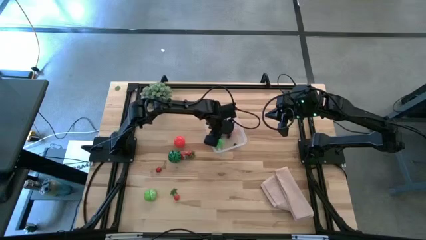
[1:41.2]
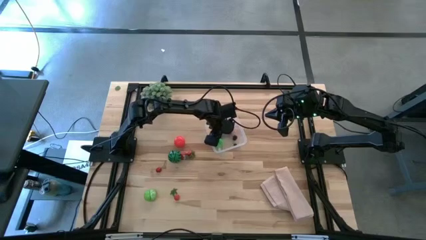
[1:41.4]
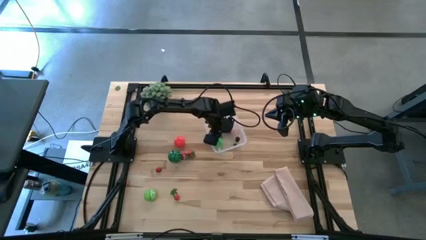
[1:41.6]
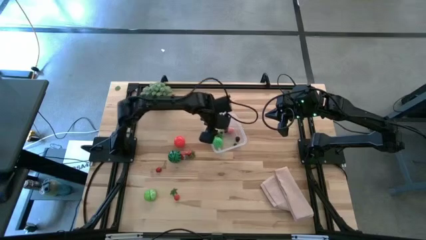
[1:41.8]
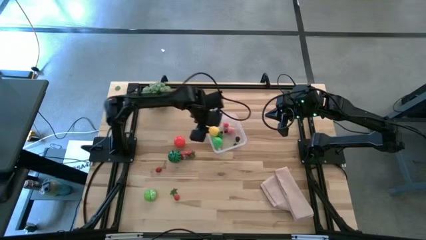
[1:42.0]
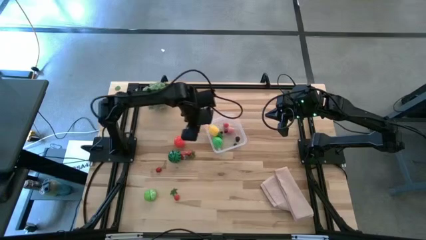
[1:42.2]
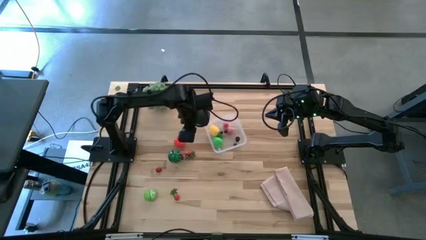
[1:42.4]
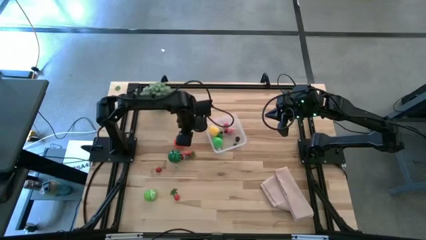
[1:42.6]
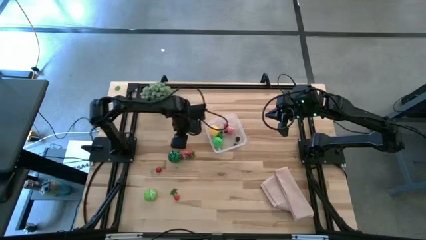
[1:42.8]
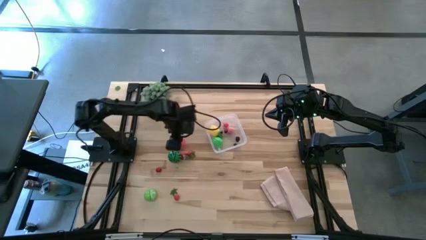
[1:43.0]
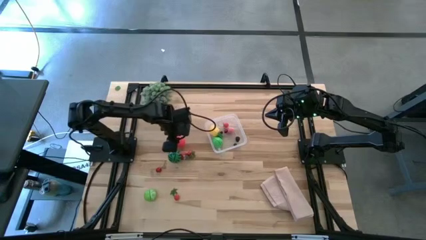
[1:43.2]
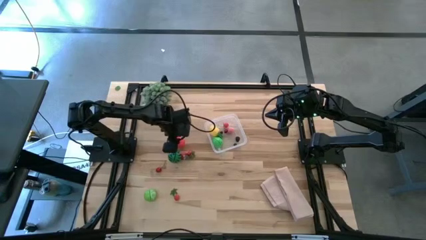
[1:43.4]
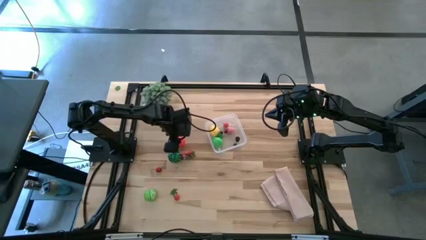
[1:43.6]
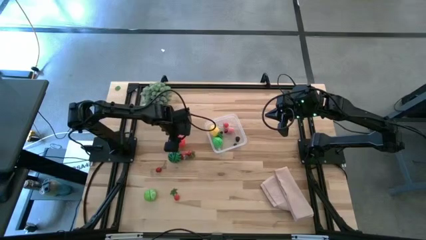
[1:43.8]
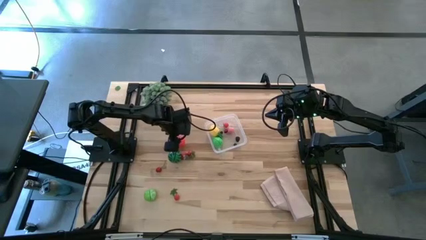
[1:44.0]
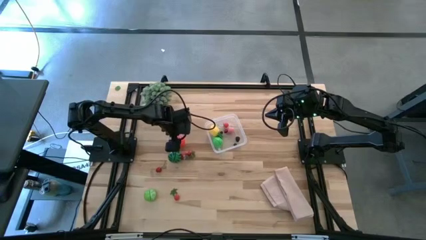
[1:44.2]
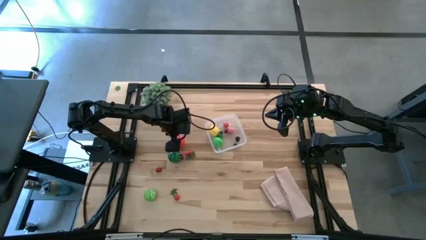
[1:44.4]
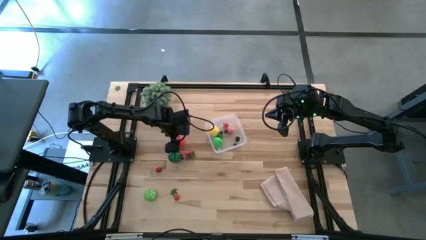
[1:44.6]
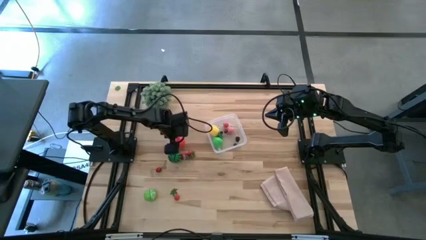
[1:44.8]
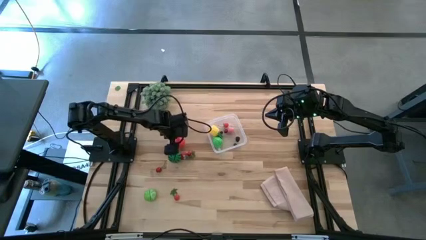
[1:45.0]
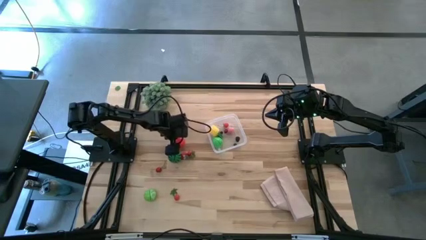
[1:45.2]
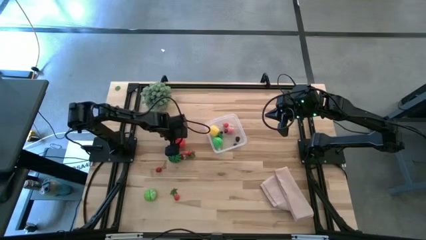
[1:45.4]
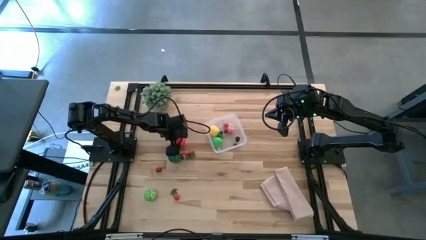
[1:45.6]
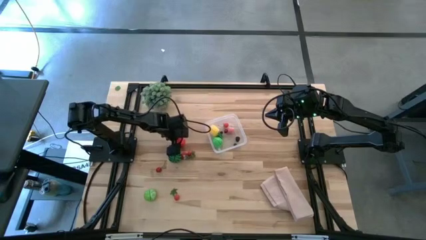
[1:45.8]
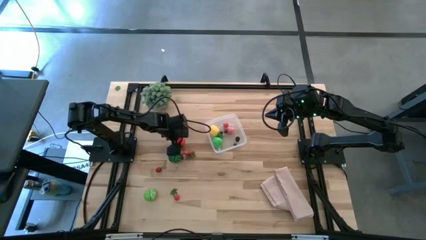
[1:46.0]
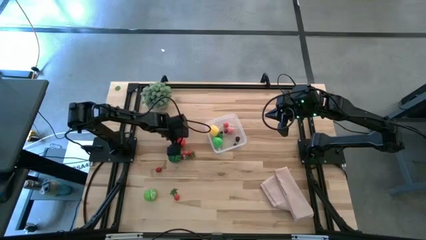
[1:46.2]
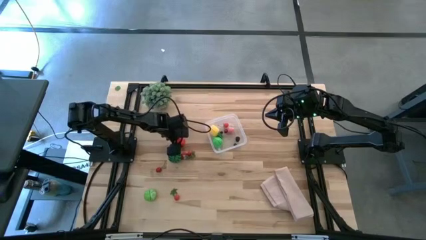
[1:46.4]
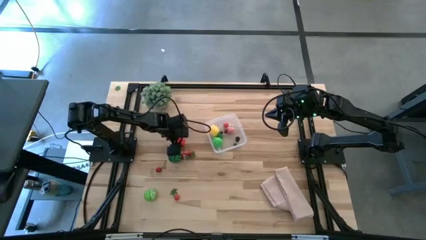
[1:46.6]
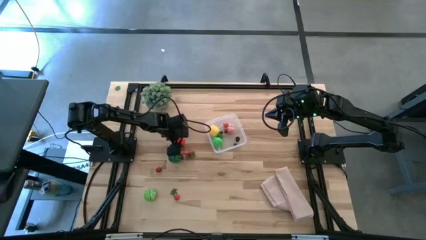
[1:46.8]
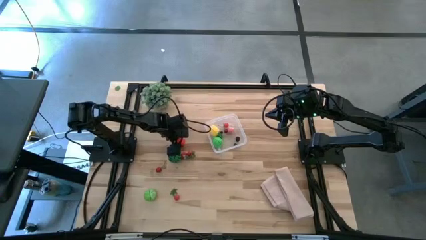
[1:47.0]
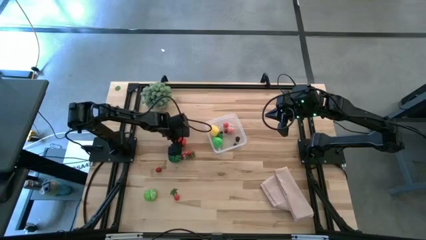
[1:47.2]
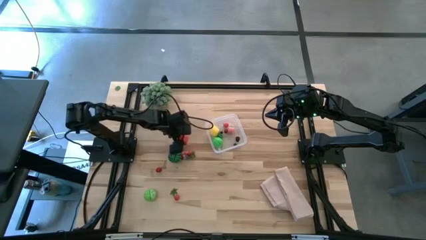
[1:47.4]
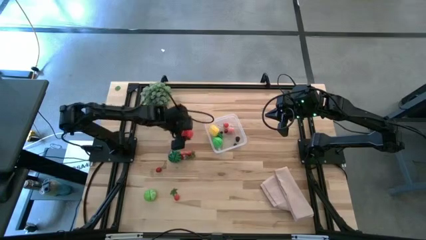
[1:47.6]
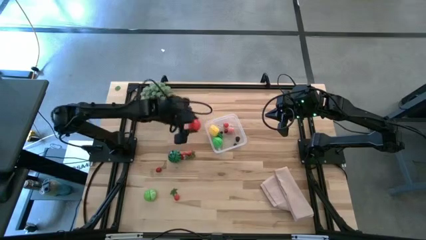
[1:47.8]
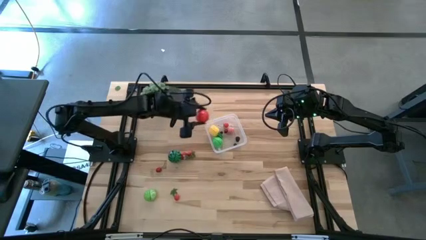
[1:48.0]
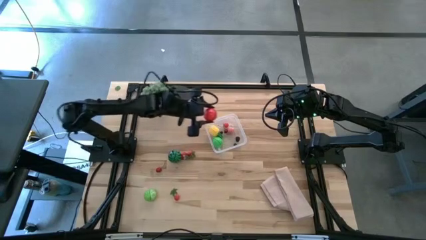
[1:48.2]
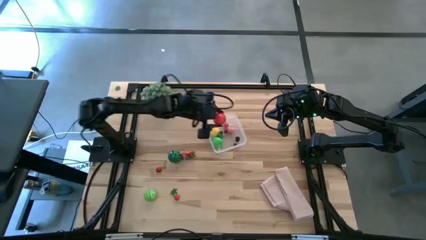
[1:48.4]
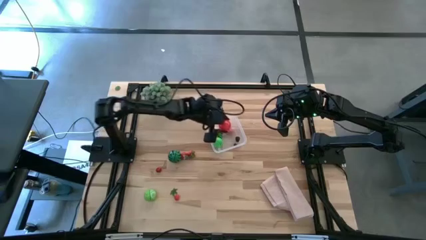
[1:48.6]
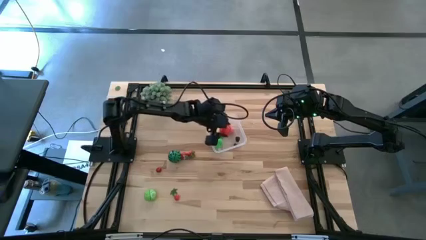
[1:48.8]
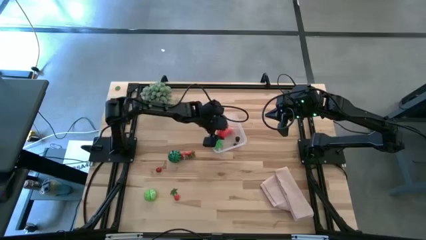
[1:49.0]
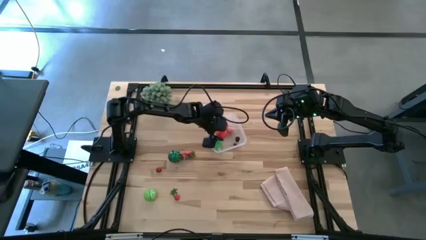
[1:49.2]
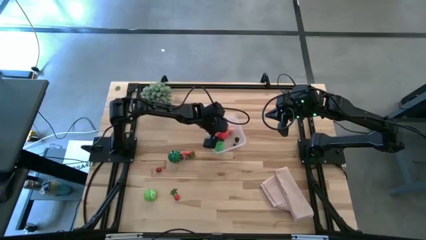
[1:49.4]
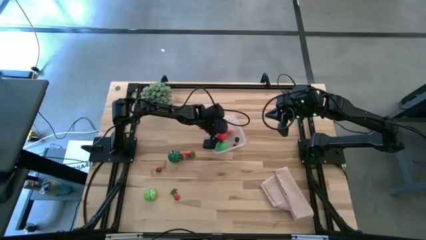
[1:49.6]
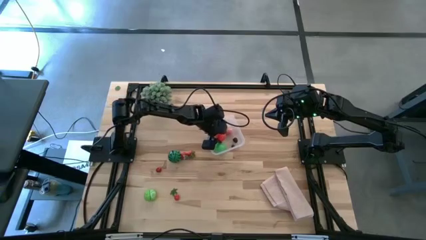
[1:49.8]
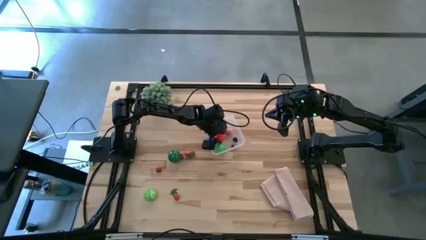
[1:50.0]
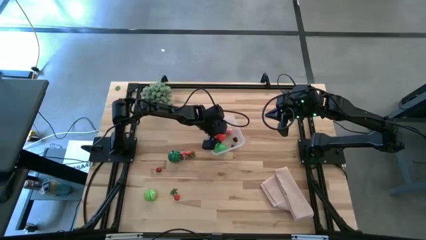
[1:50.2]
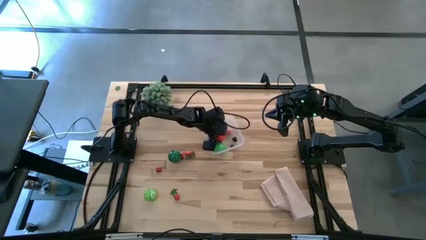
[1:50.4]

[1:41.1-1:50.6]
Task: Pick and placing Produce into tupperware
Put the orange tomato into the transparent bin

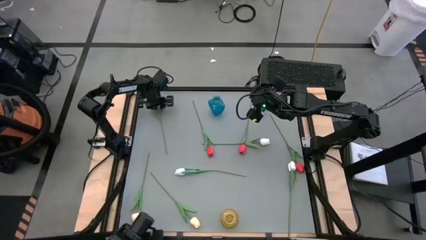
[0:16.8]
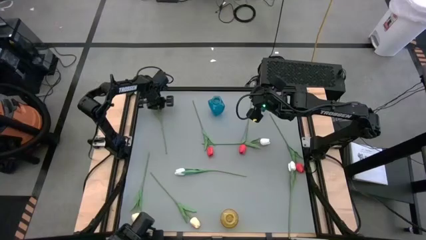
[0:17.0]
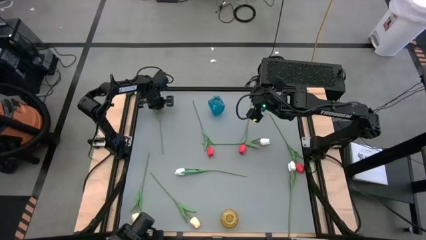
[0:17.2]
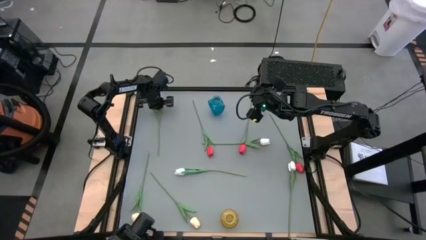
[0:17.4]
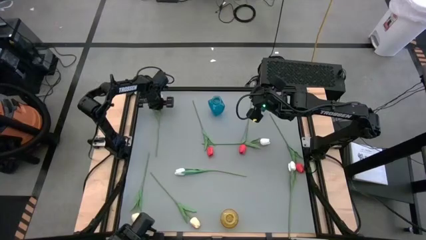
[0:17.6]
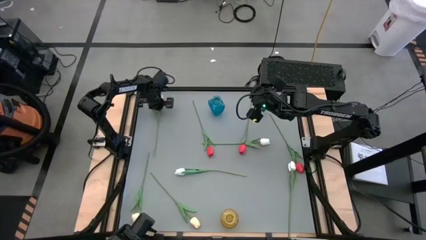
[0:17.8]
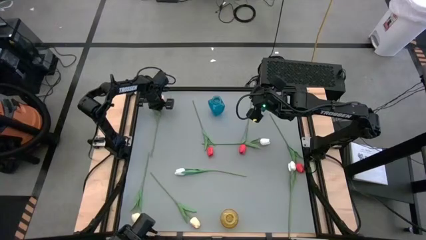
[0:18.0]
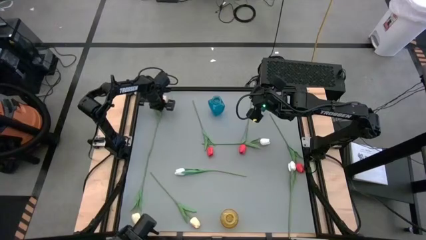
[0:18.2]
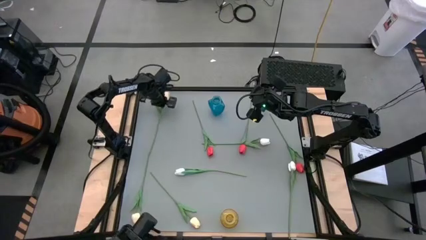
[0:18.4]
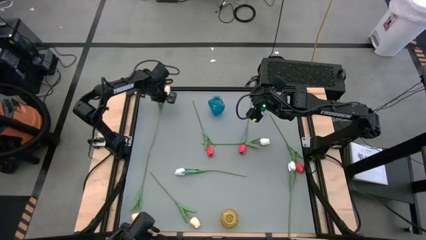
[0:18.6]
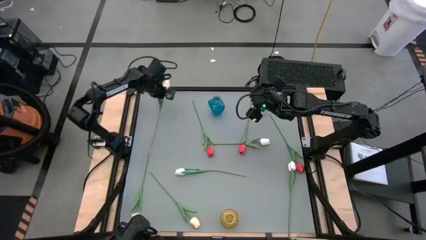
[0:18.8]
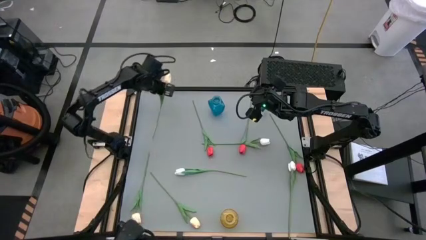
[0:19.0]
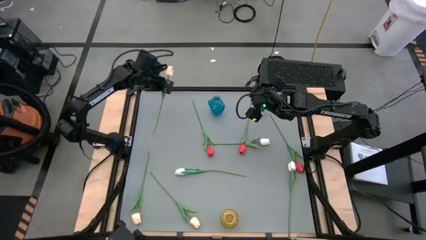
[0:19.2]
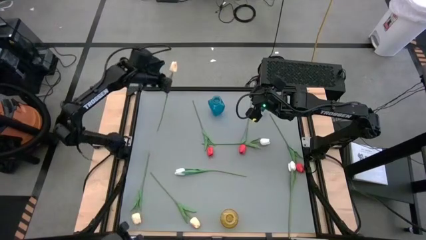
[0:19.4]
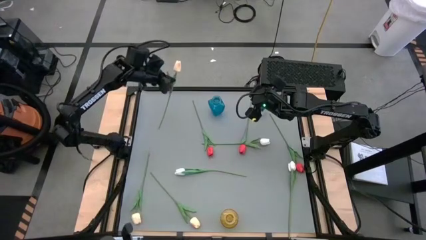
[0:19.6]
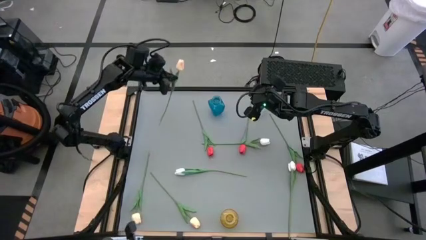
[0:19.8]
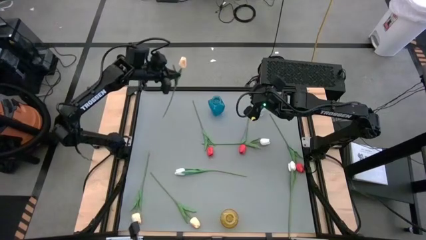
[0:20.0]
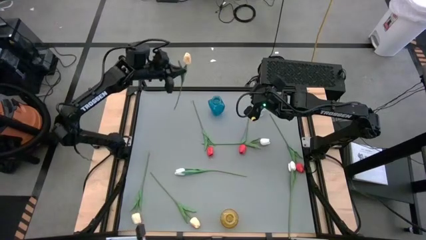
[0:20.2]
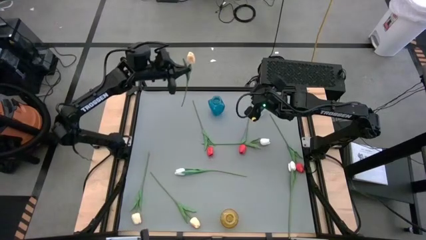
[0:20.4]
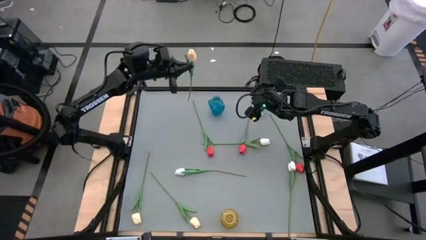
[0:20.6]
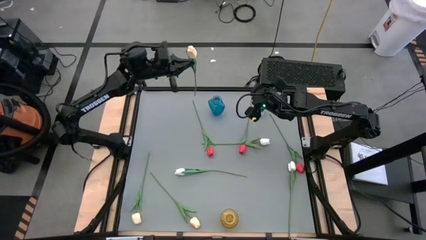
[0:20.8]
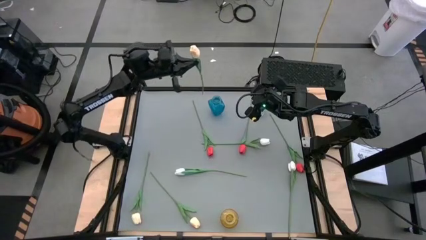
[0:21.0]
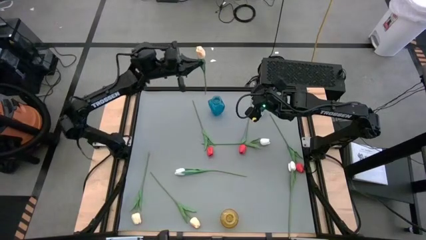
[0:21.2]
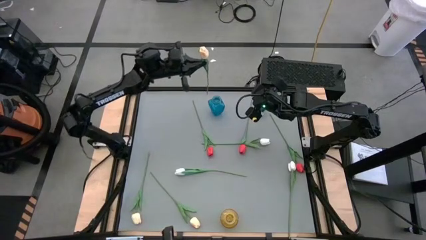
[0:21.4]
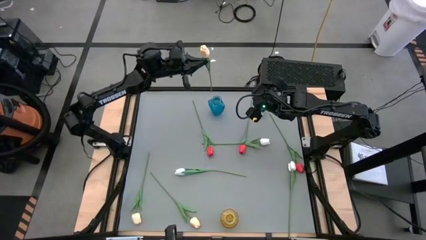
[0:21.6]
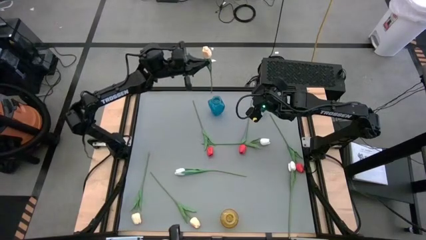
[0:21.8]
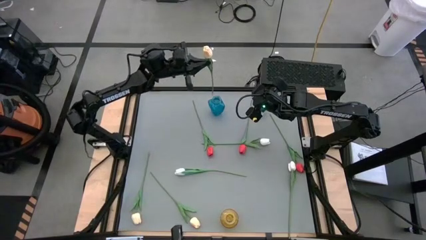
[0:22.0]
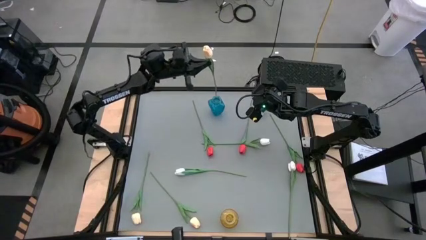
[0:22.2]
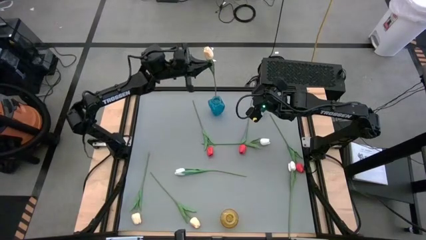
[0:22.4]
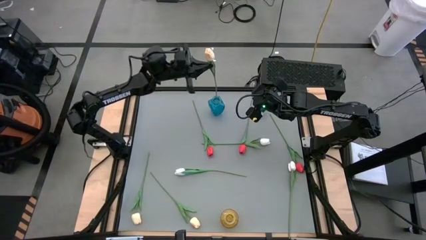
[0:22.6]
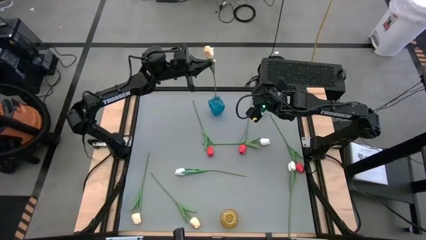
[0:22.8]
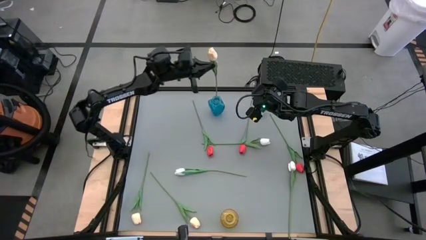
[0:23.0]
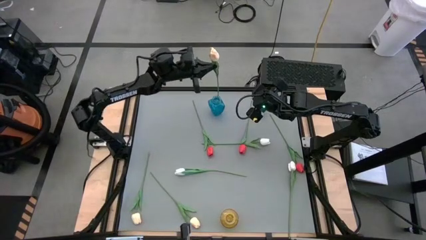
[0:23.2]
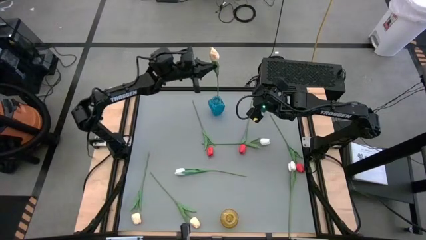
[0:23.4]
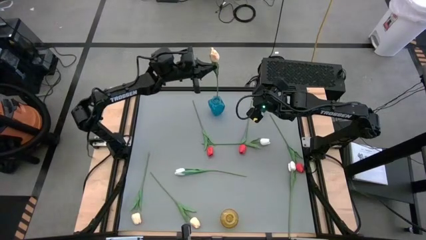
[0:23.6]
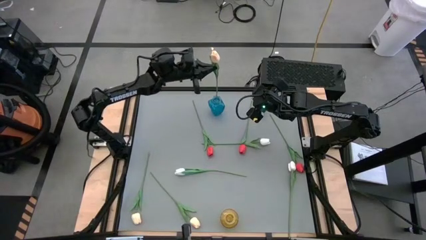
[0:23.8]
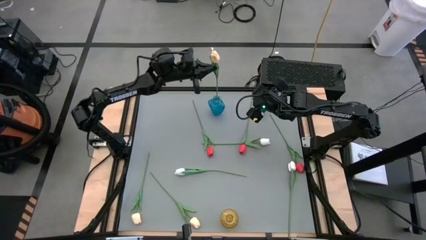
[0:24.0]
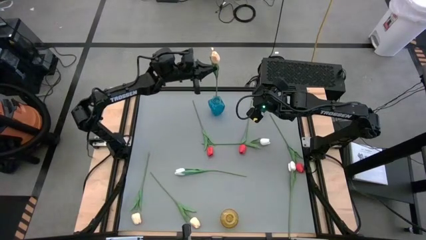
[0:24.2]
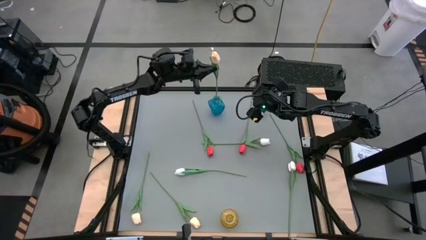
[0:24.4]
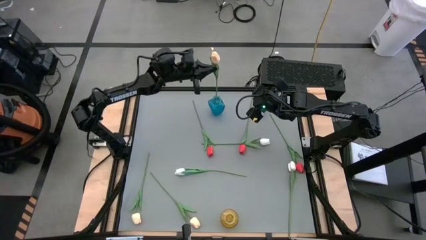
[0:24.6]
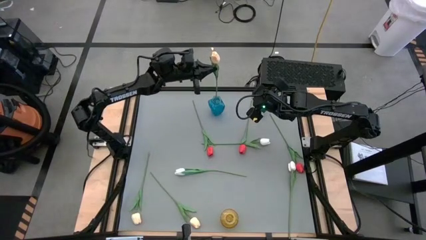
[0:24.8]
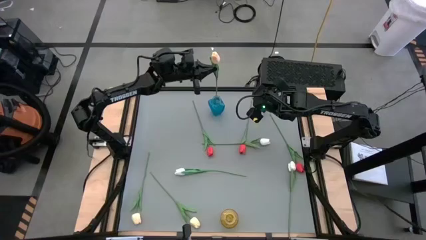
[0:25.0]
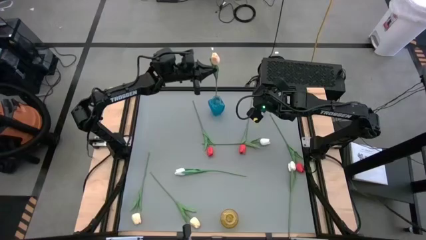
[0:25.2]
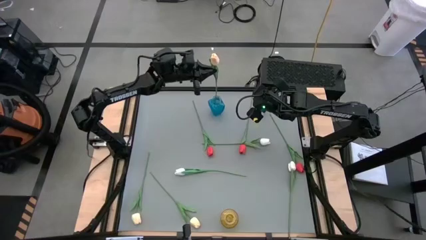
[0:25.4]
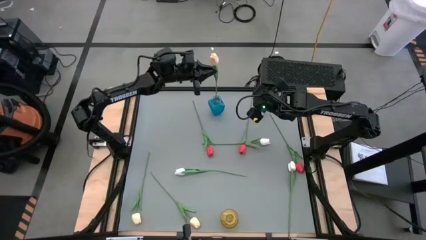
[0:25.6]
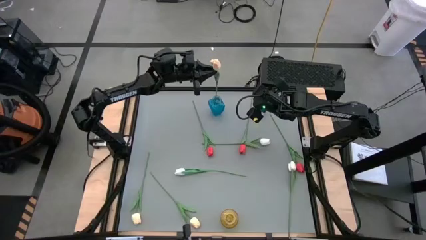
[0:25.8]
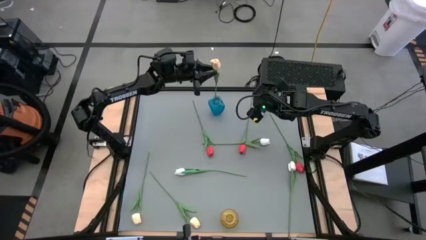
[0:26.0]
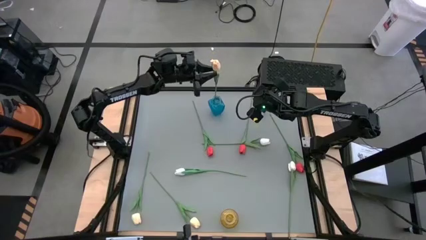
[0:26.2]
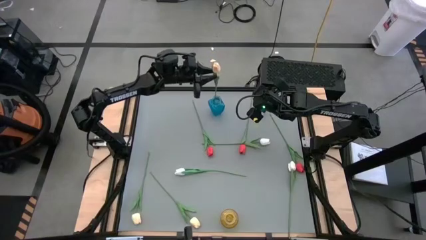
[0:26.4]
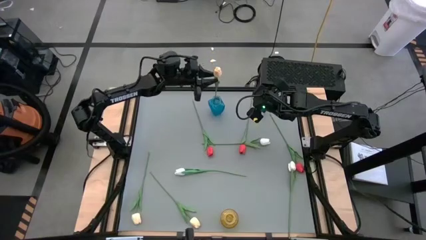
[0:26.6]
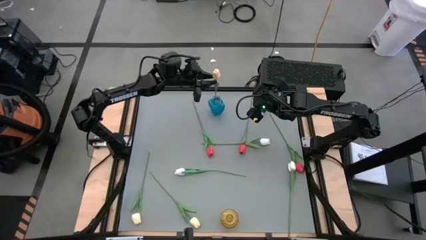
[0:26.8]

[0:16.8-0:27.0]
Task: Sort flowers into vase by color
Put the top left yellow flower into the blue vase
